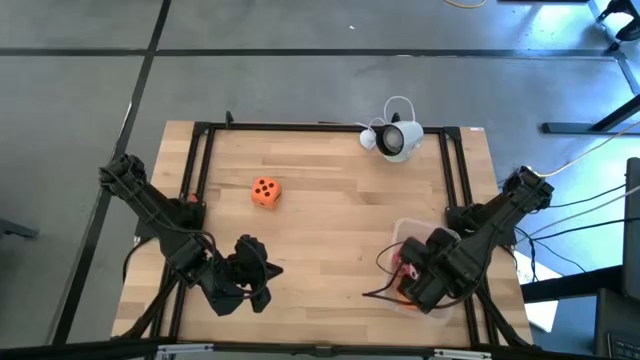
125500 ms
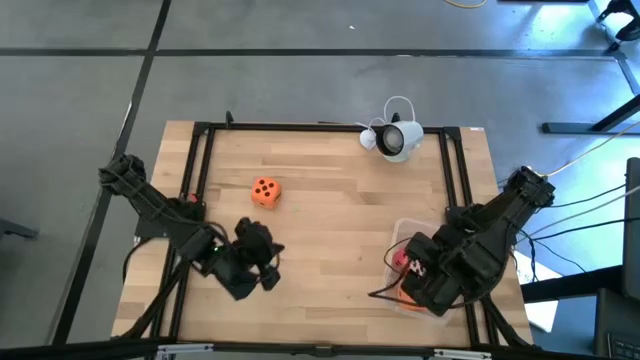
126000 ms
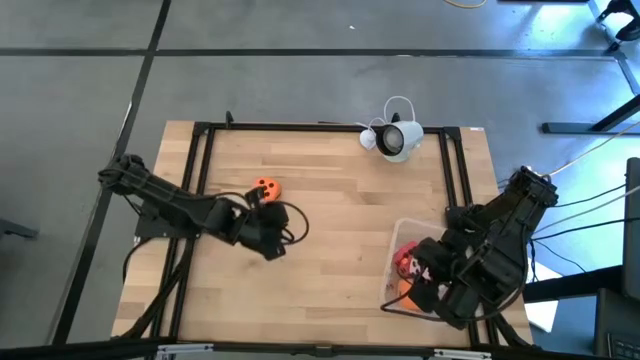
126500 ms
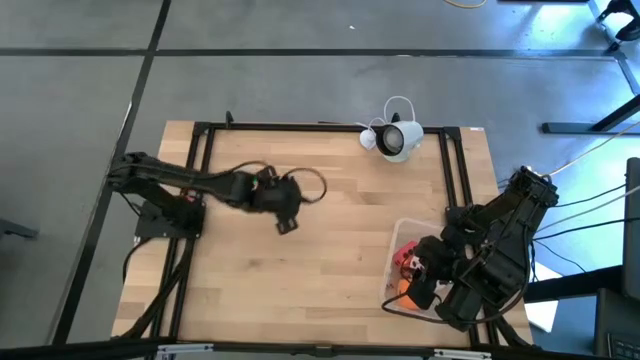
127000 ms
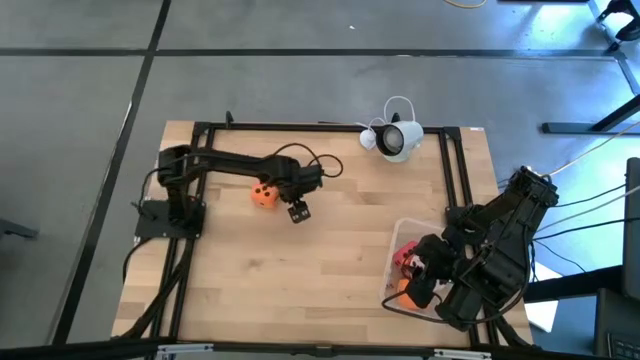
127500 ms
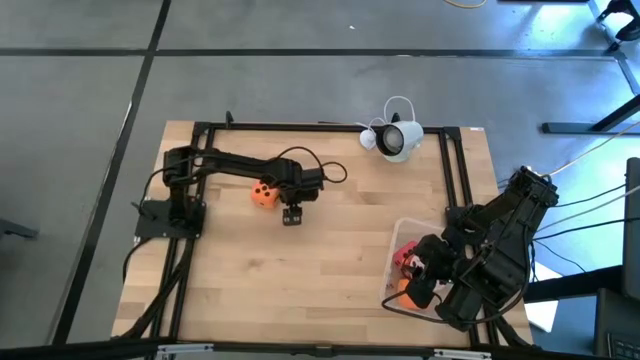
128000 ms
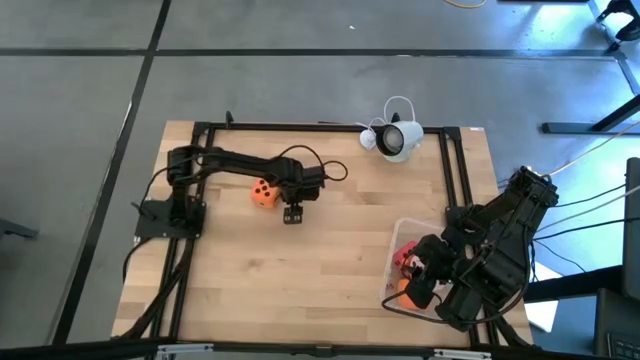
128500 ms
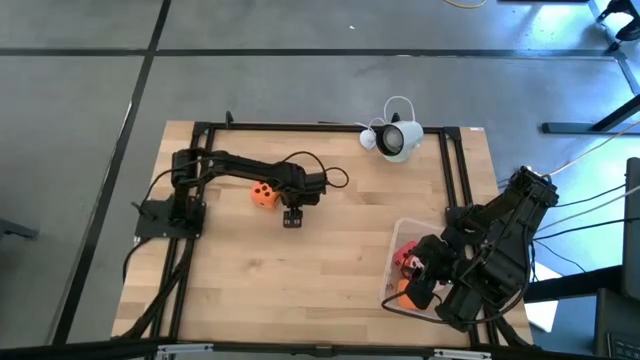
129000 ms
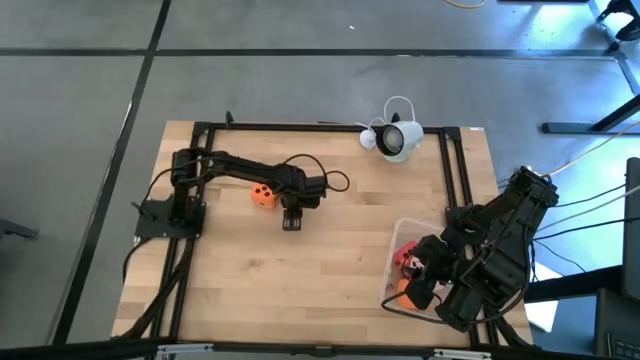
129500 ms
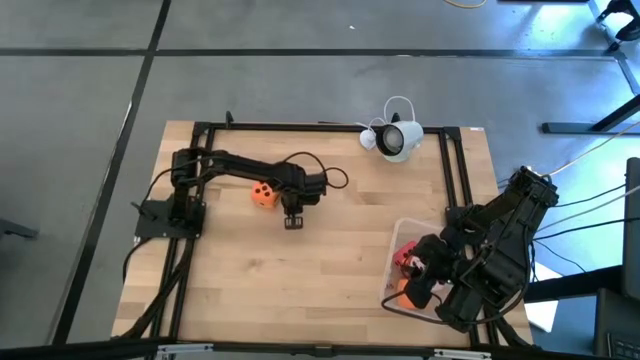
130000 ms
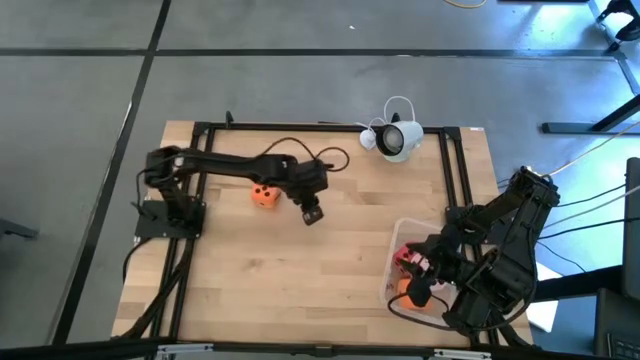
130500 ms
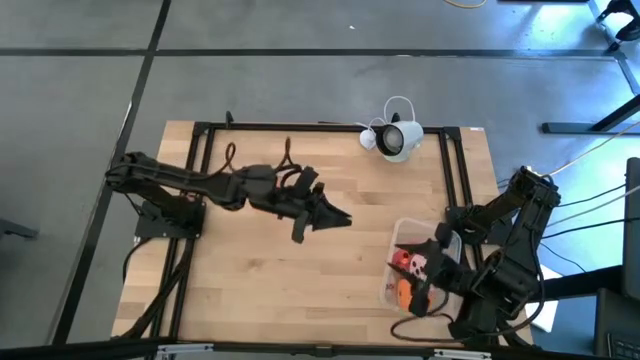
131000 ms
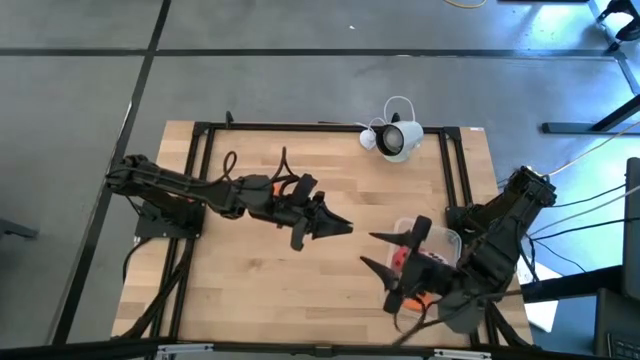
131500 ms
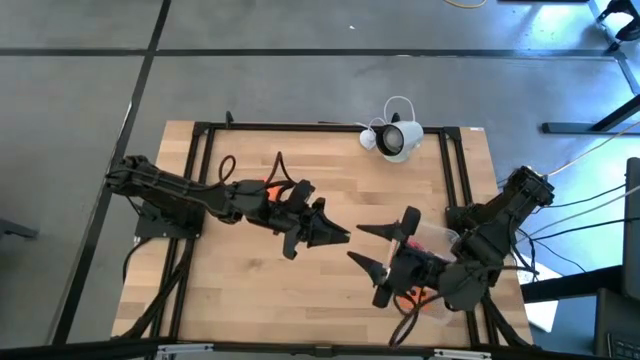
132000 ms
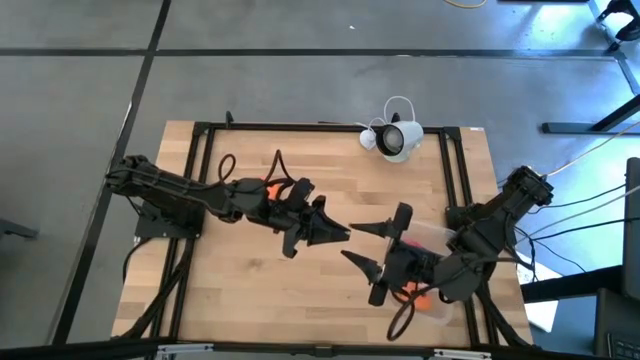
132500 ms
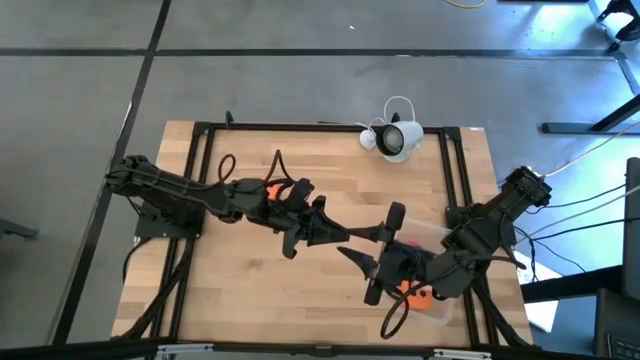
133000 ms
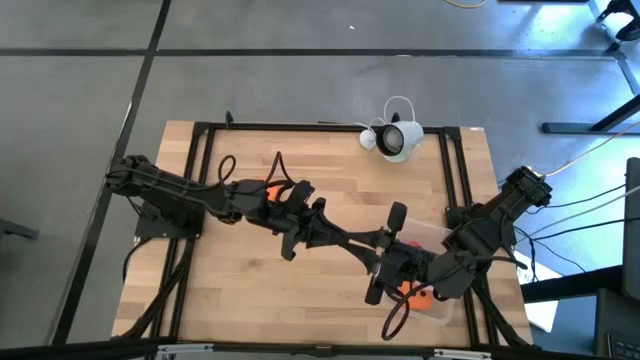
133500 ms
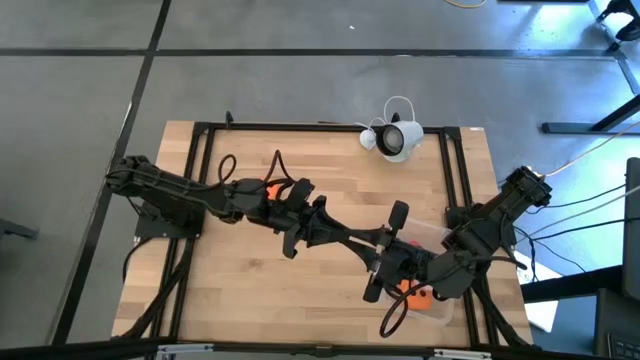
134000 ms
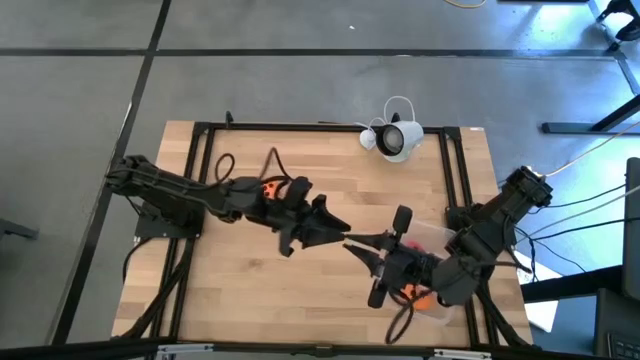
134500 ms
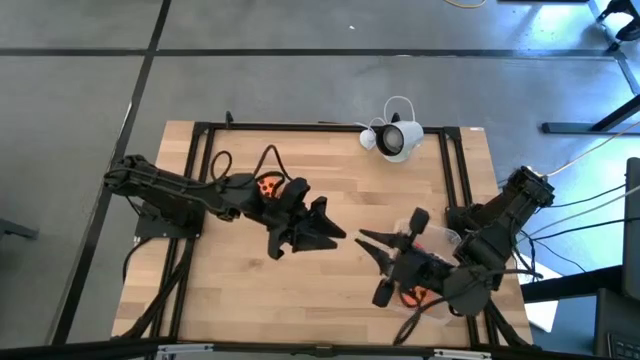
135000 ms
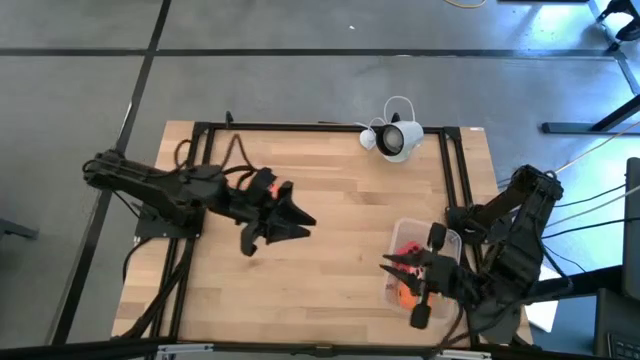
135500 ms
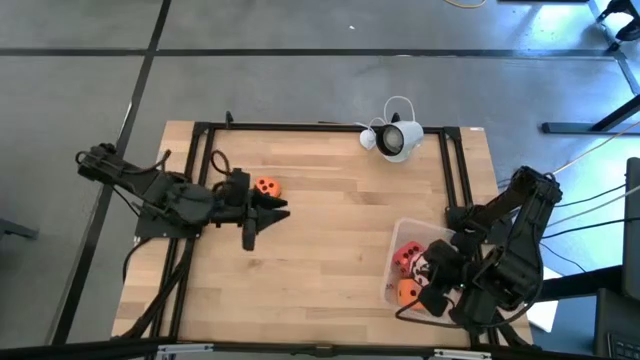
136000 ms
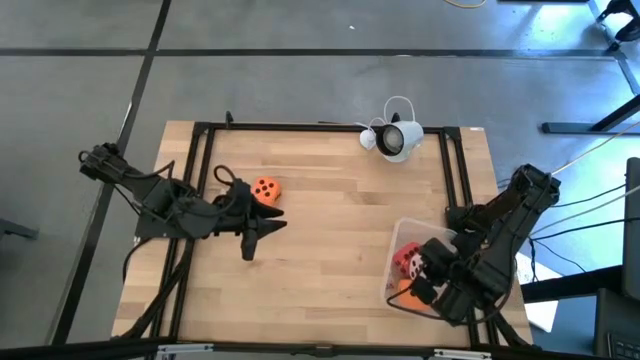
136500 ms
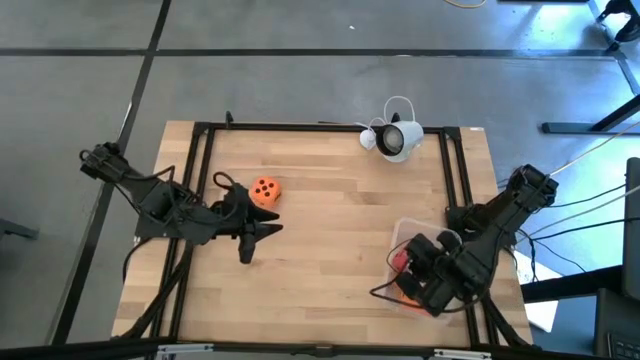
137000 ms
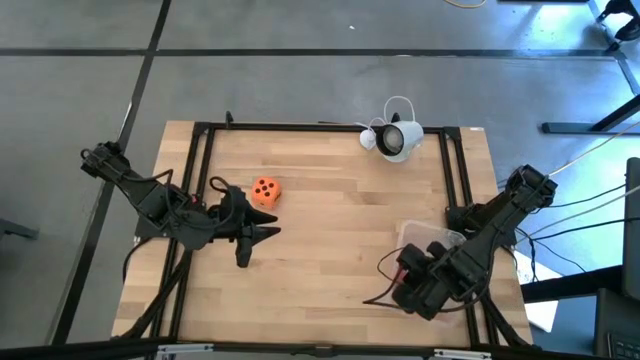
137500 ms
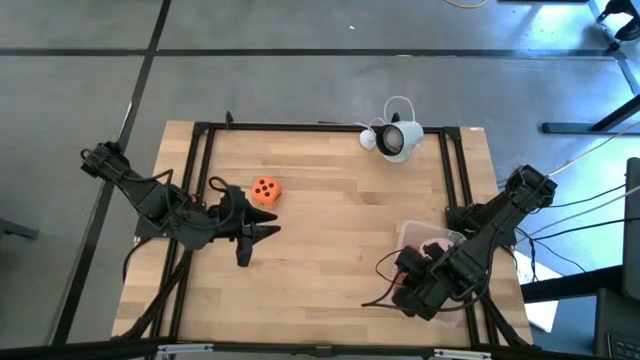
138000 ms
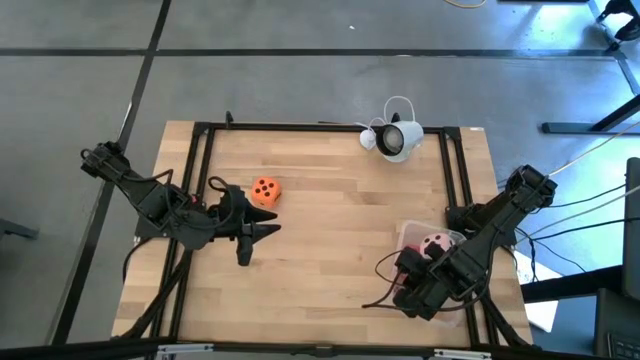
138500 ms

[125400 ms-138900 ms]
Task: Pick & Place Dice
Put the small green die into the transparent bin

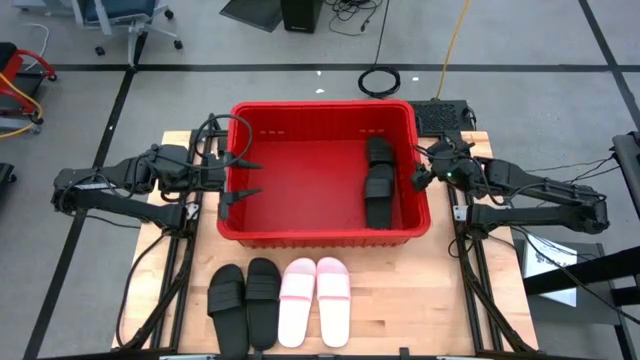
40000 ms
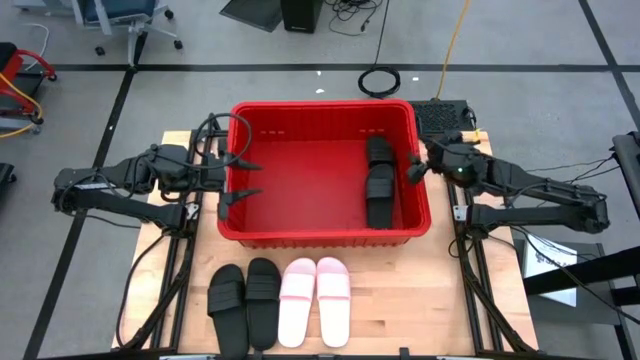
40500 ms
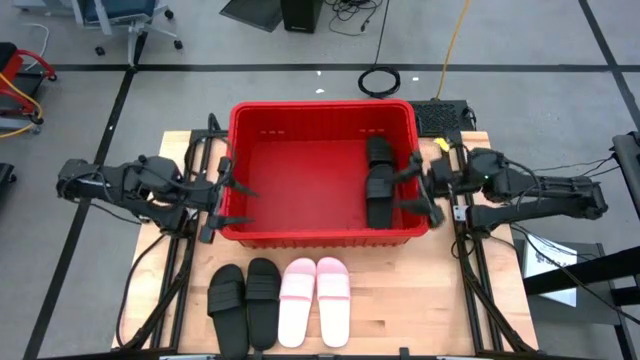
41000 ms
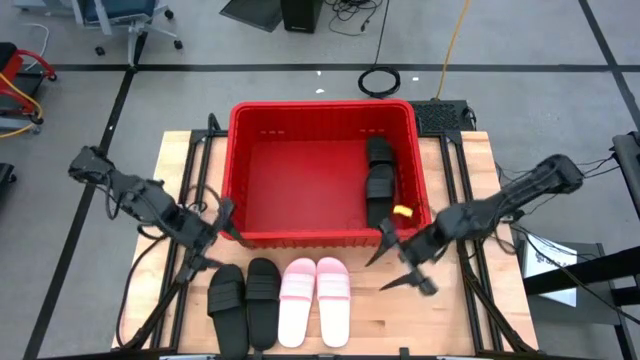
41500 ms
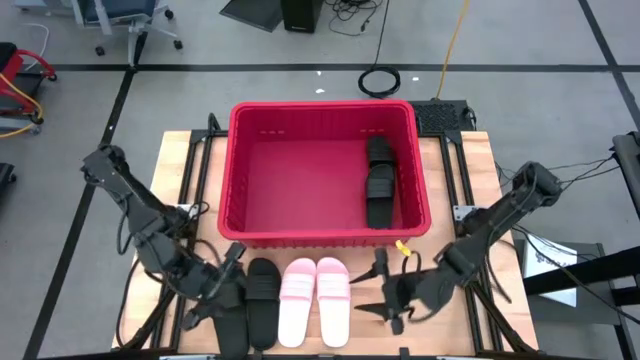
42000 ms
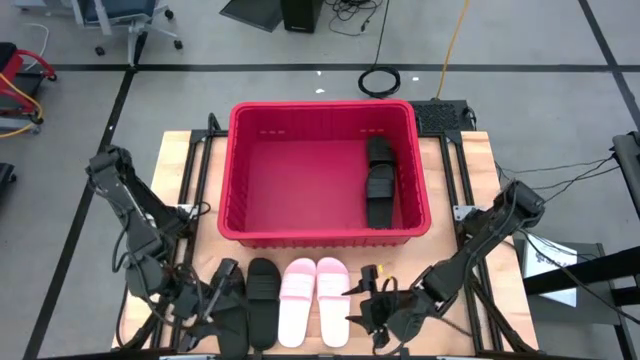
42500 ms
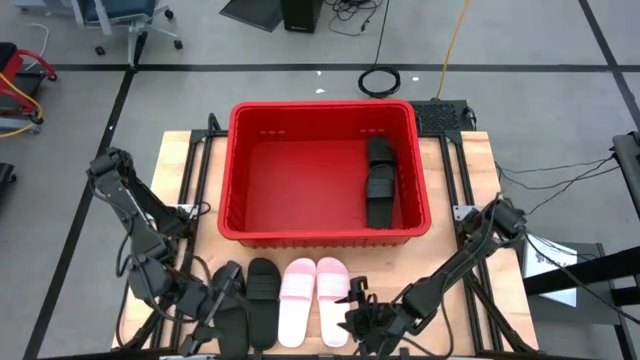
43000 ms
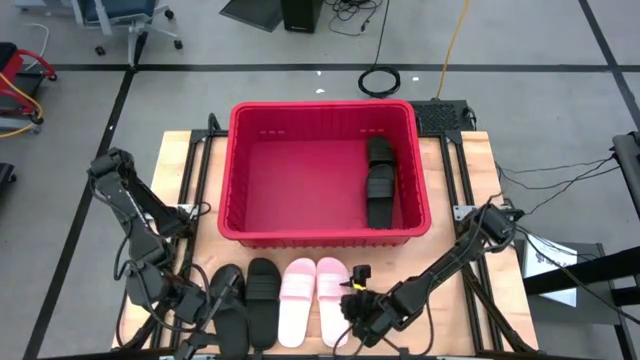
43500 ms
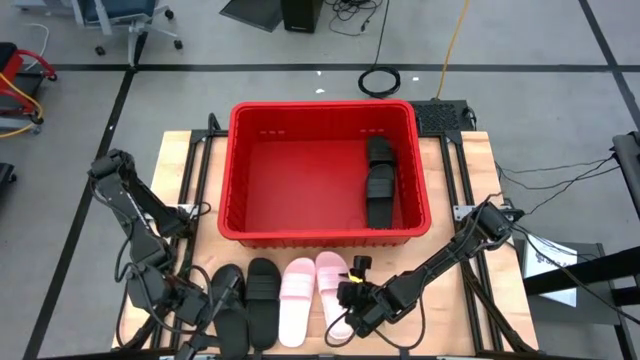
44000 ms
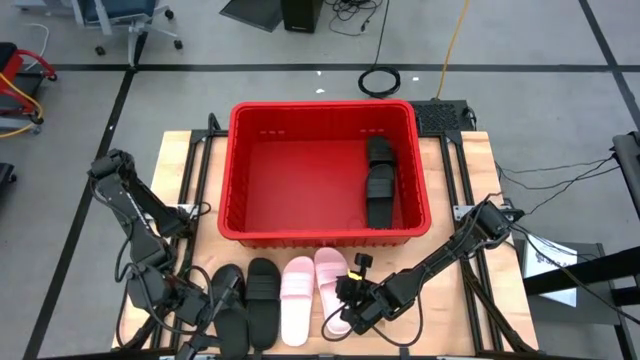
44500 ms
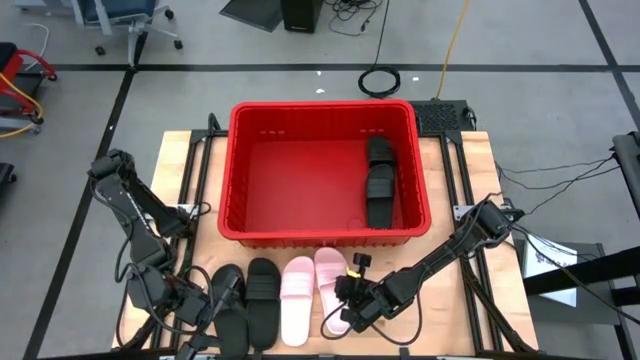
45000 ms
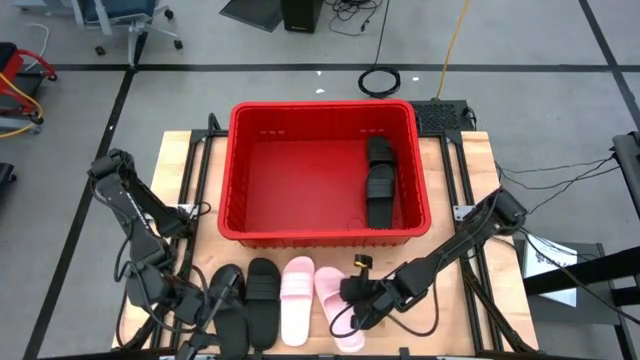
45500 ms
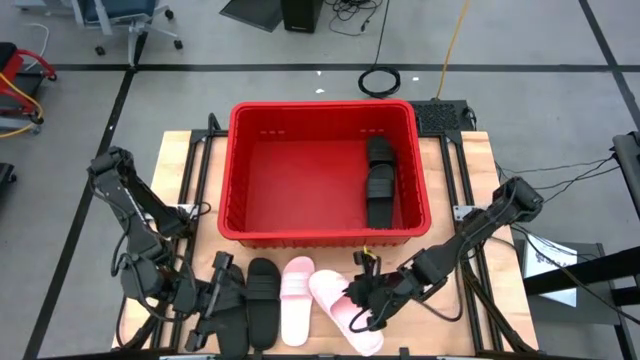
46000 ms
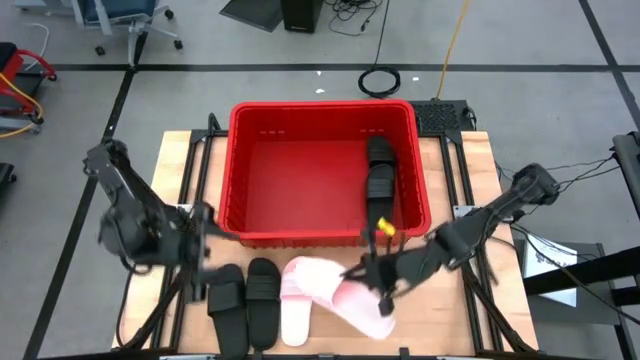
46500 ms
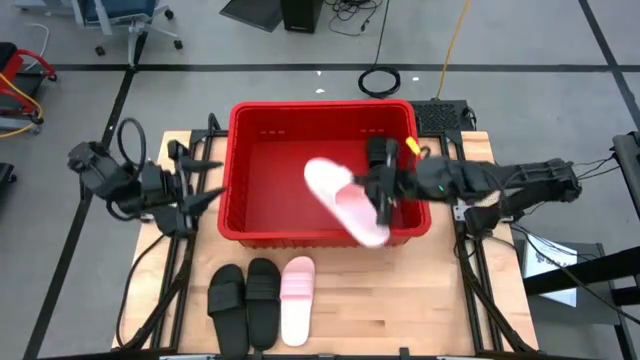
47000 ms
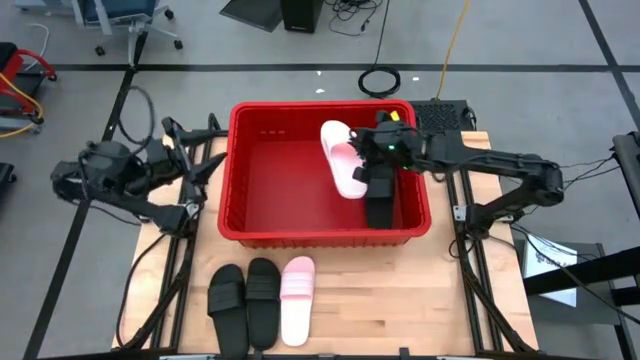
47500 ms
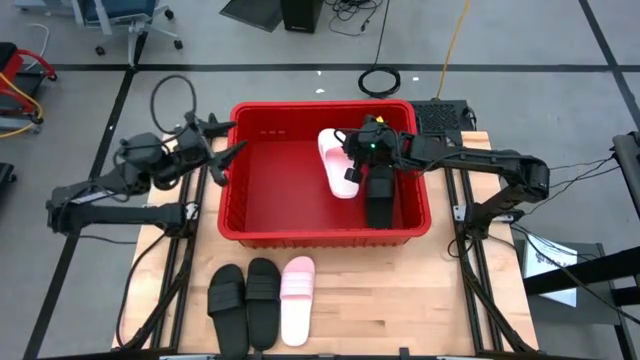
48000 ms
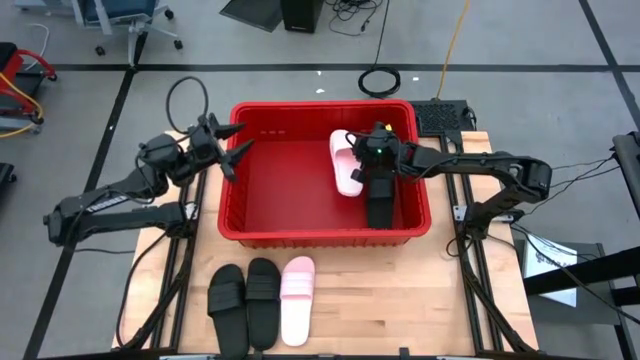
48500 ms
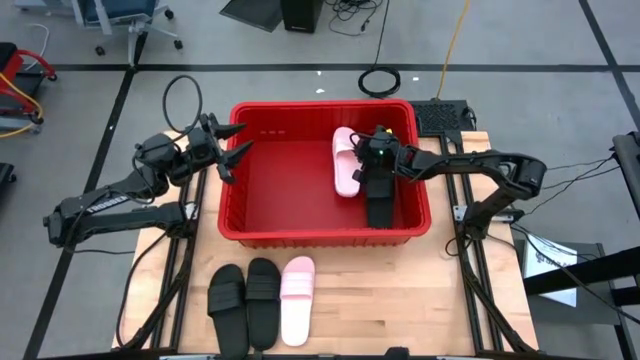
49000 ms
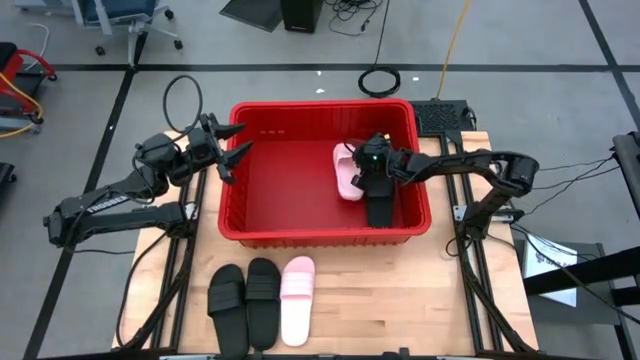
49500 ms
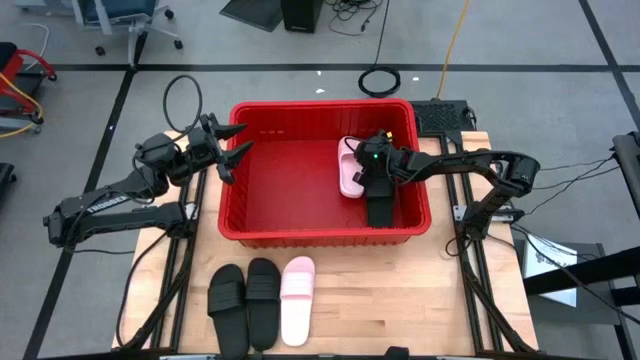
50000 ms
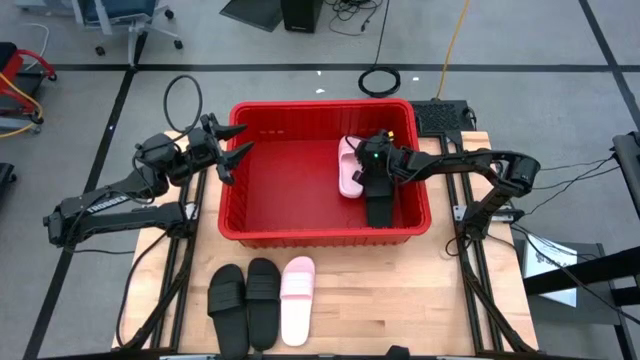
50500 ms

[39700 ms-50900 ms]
Task: Pick and place slides into bin
Put the pink slide into the red bin
